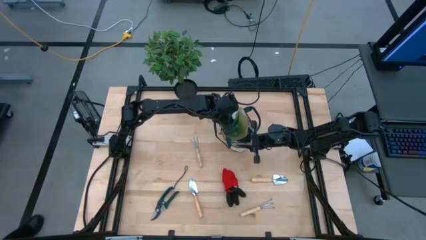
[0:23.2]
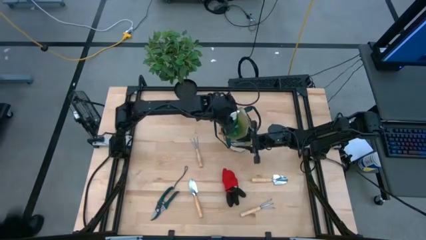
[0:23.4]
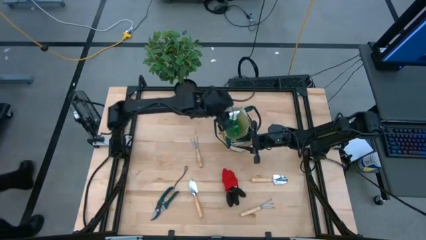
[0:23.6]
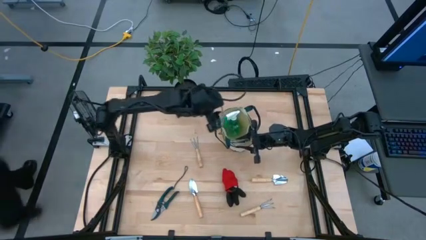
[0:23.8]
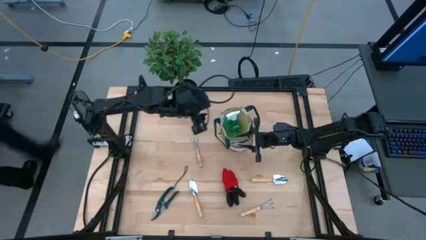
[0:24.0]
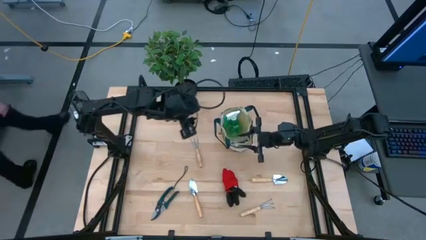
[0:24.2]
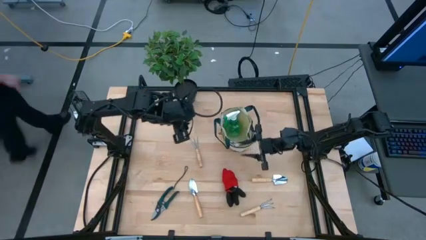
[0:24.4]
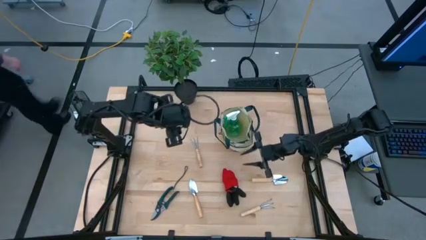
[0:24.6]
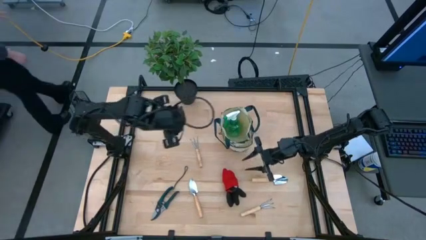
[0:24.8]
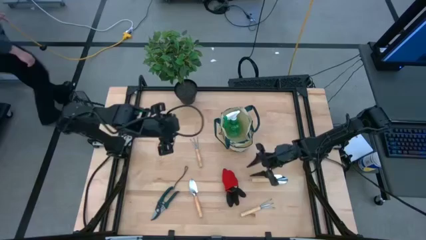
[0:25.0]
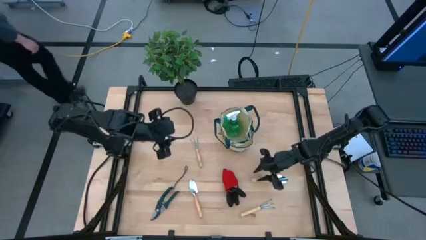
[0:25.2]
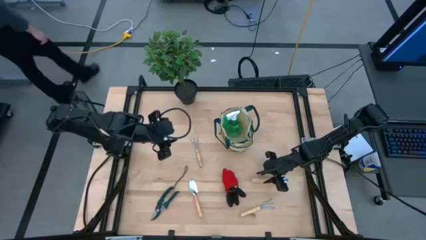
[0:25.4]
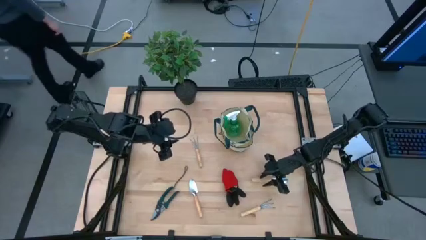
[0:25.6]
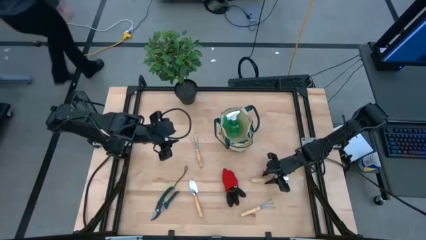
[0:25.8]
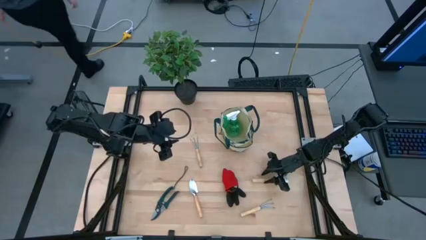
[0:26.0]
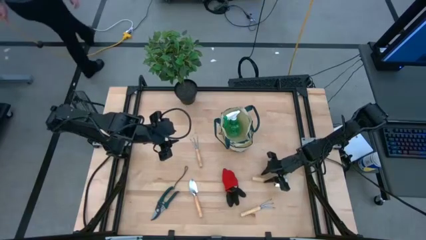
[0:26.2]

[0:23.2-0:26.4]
Task: Pick & Place Garden tools in Gardening bag
Put the brown trowel into the light brown gardening bag

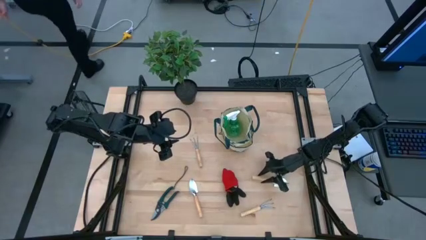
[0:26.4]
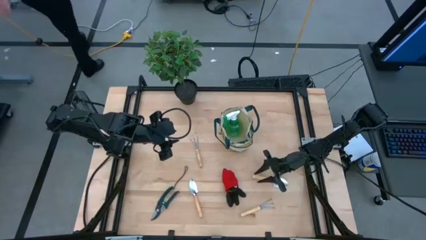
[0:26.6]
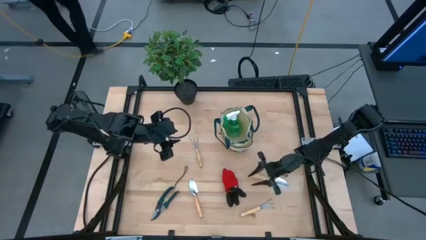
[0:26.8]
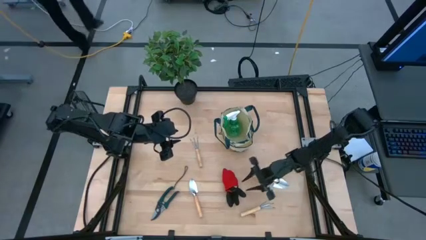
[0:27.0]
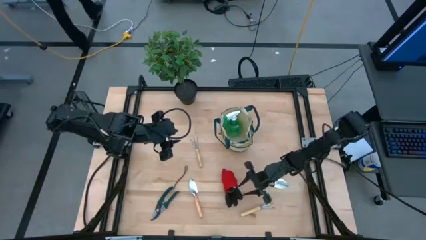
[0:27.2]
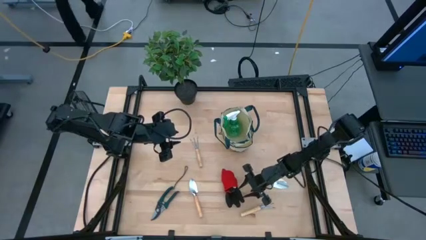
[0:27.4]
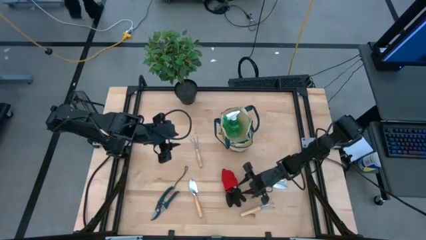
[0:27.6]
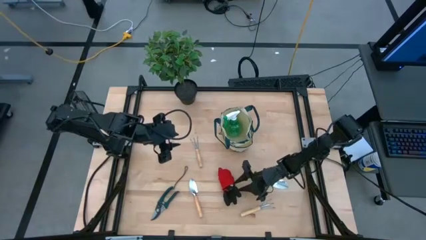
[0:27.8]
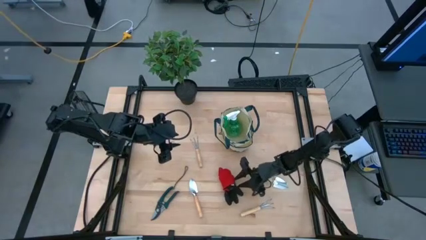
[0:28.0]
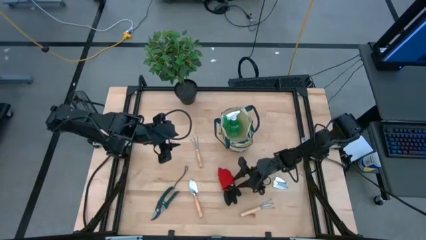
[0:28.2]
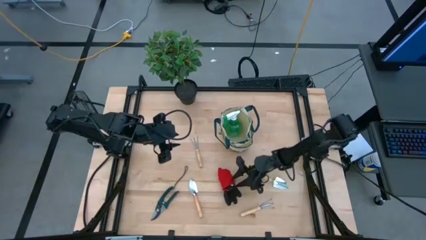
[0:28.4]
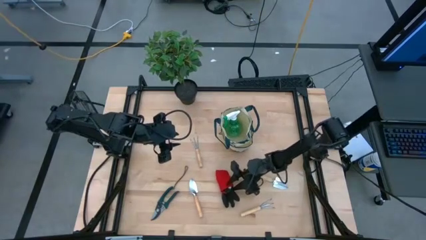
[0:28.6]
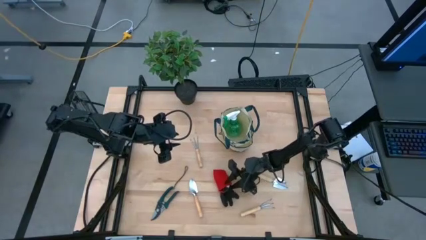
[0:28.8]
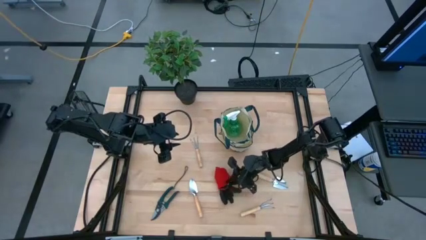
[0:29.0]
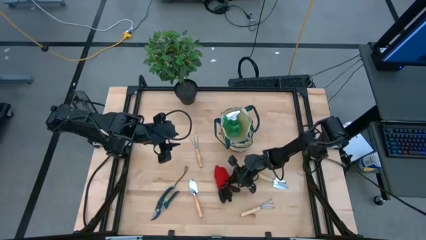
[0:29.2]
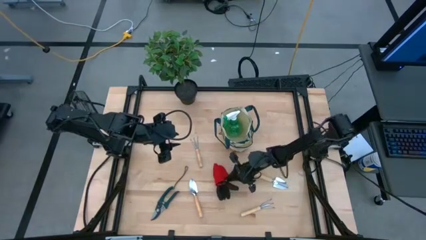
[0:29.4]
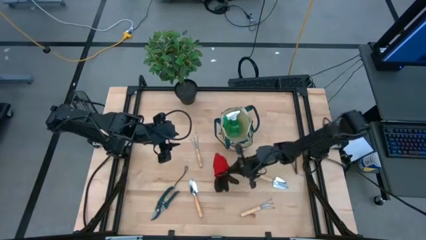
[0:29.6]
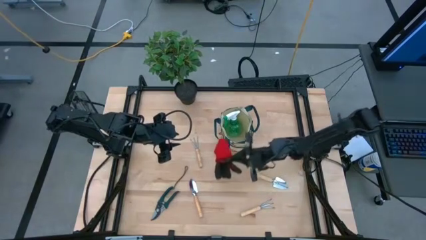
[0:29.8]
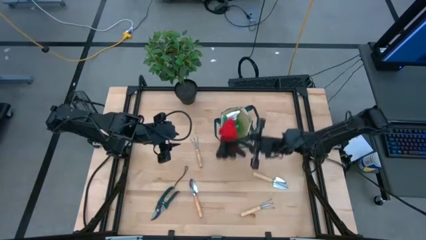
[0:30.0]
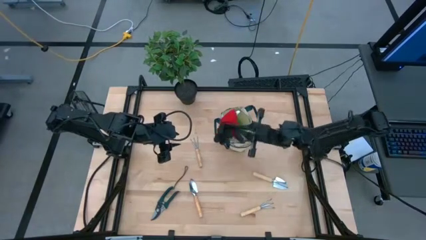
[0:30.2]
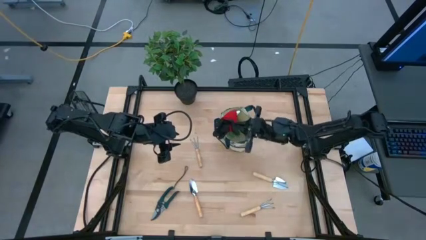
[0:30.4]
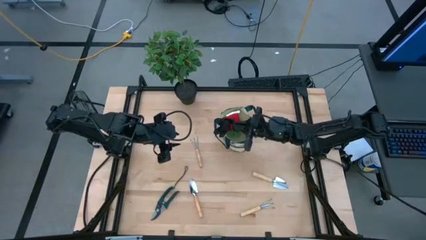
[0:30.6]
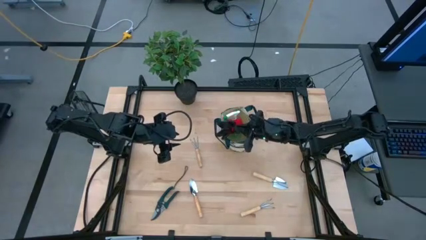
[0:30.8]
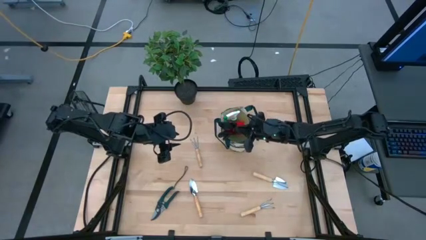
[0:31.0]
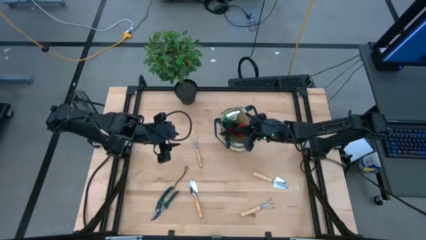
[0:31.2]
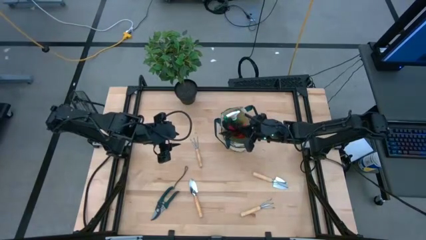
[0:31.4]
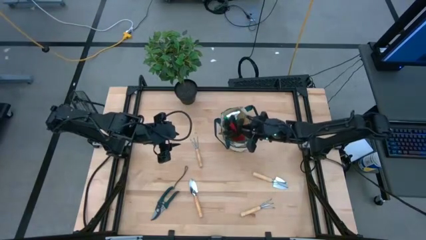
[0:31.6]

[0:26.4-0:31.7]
Put the red gloves into the light brown gardening bag

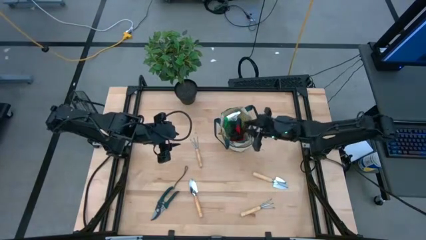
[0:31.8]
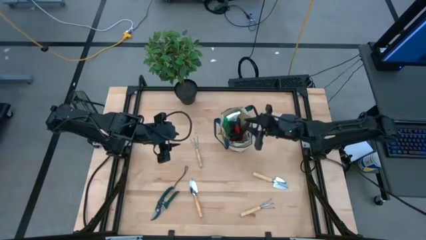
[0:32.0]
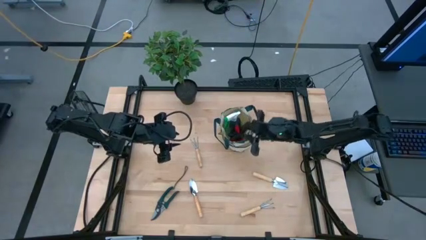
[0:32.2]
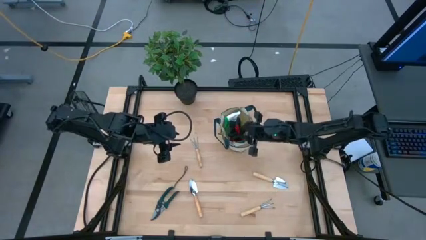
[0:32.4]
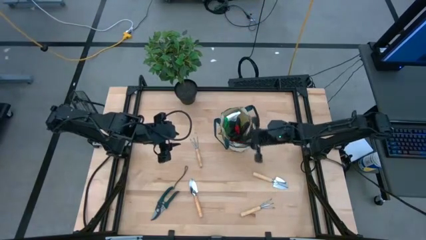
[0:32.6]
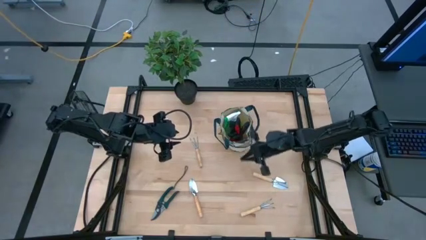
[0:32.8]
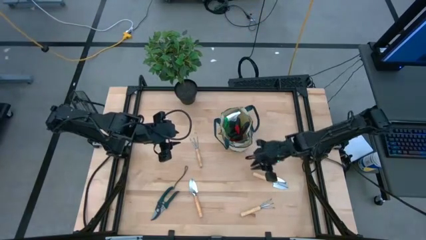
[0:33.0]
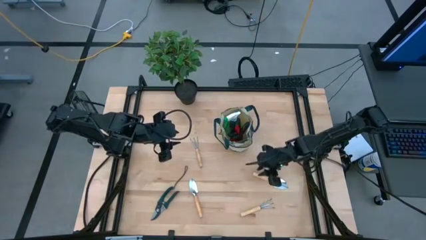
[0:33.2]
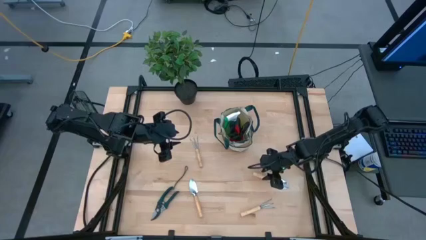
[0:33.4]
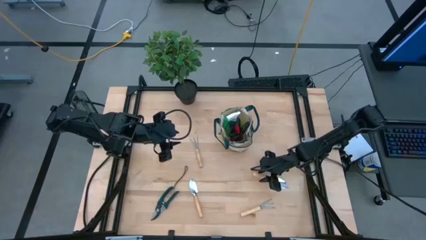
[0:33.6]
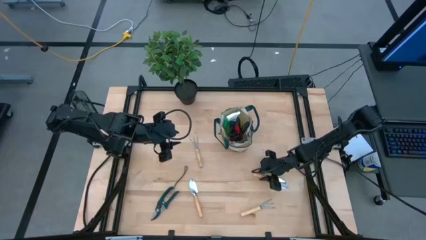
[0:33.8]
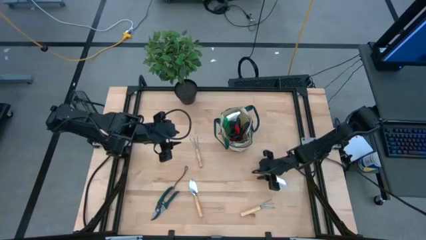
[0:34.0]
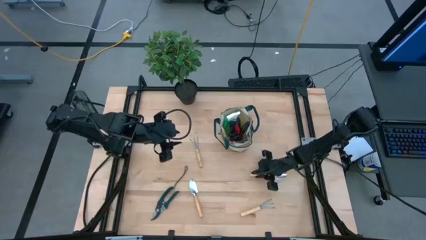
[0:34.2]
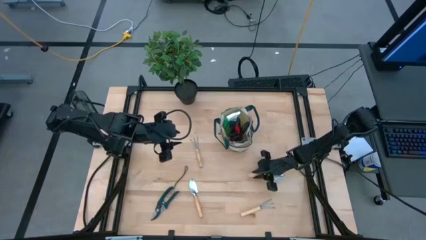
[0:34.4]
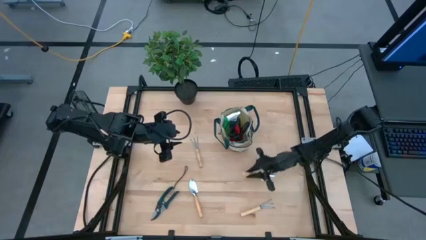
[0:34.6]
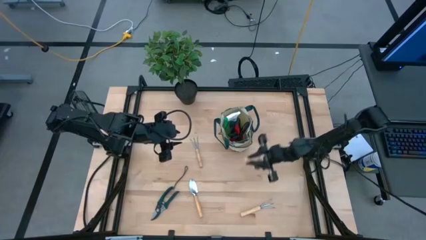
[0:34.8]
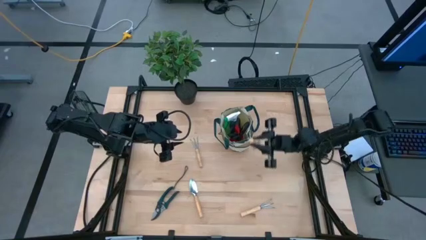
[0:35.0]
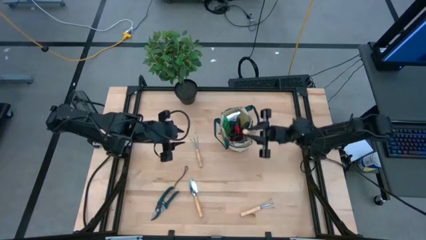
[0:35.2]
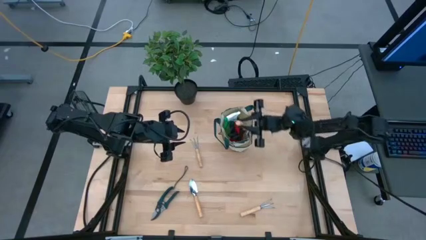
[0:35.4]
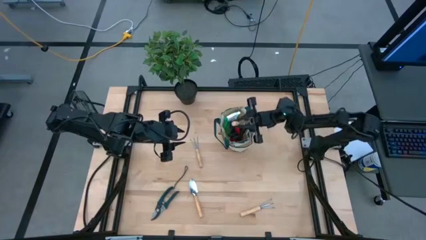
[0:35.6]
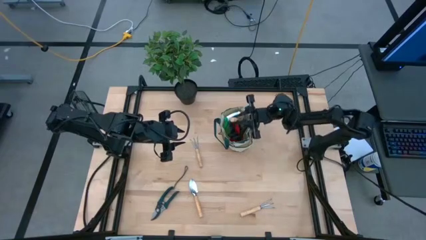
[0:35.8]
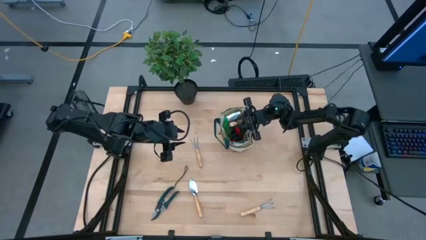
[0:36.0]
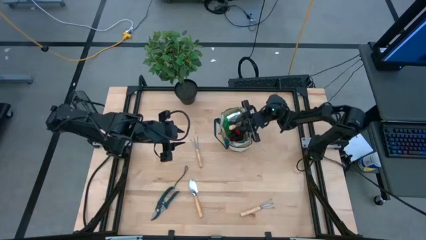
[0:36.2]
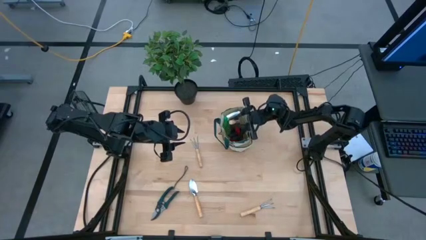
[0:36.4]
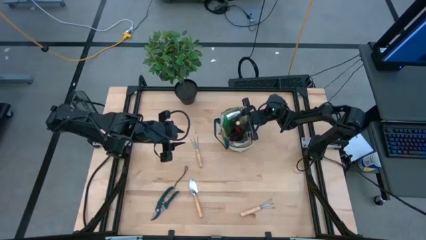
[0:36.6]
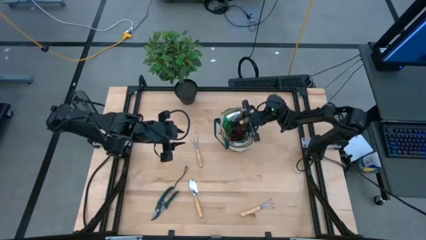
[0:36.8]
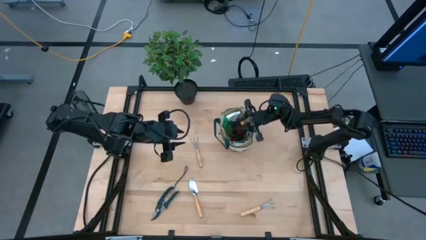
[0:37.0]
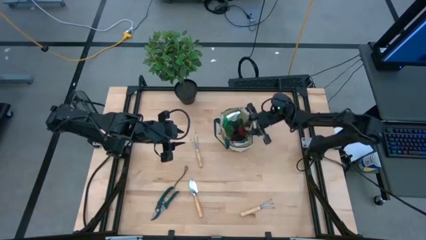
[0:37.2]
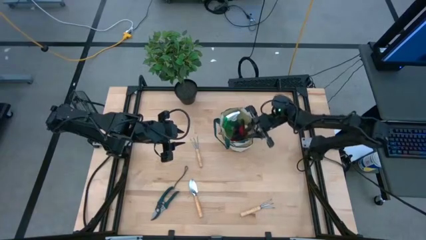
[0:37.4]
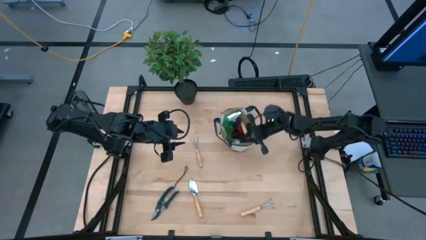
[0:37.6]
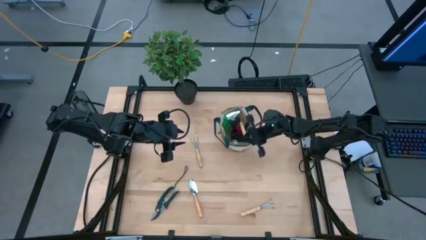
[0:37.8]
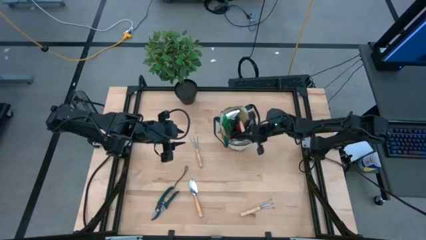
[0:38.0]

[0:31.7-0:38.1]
Put the brown trowel into the light brown gardening bag
